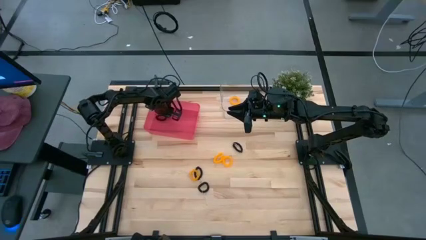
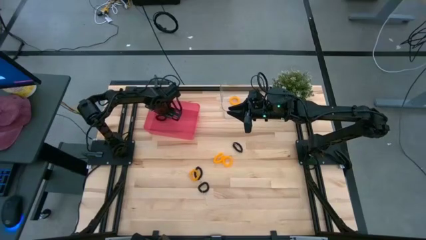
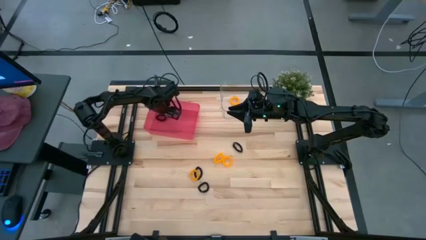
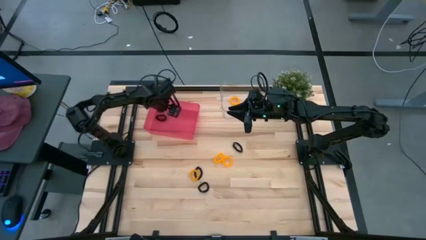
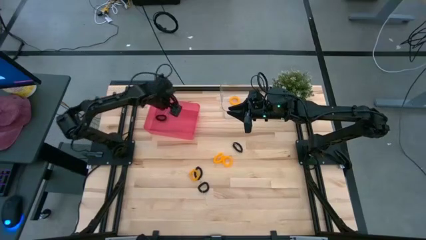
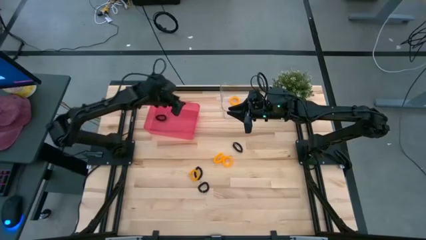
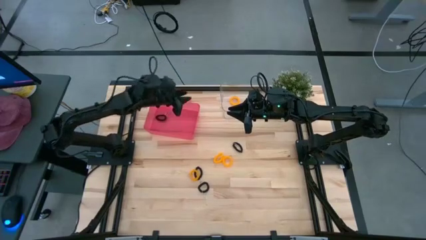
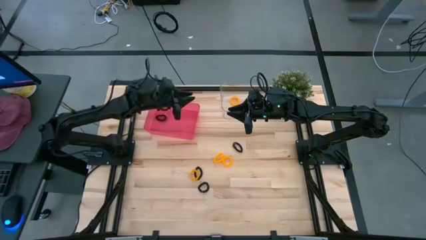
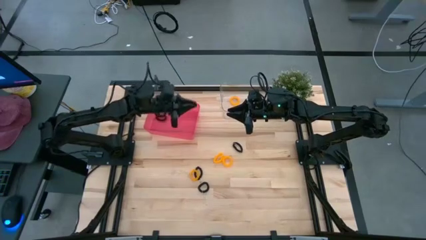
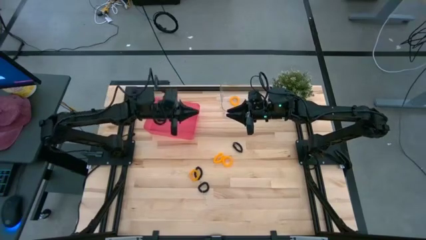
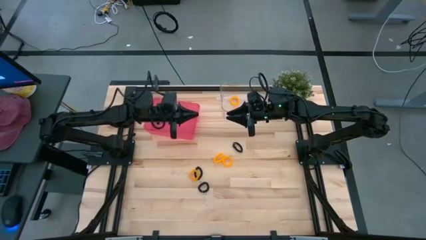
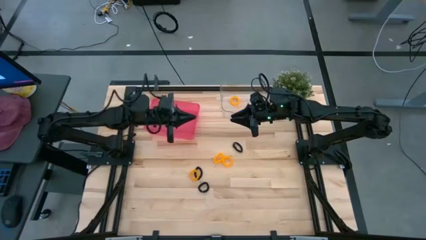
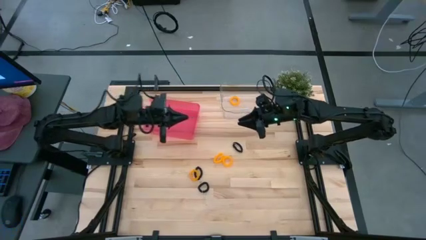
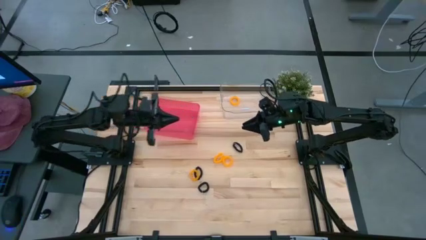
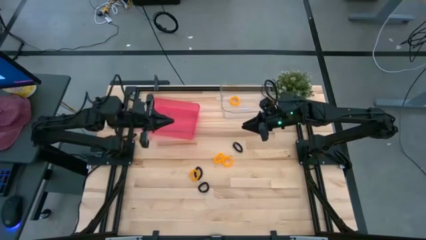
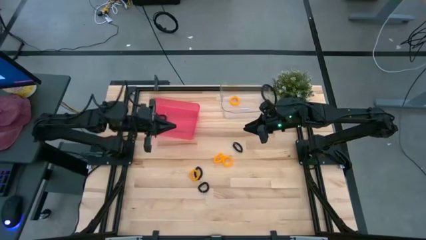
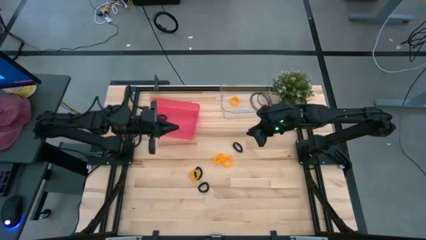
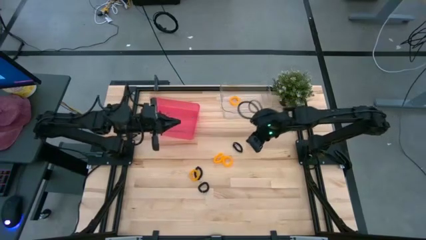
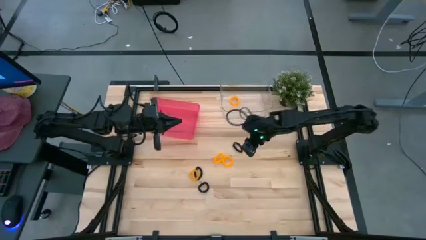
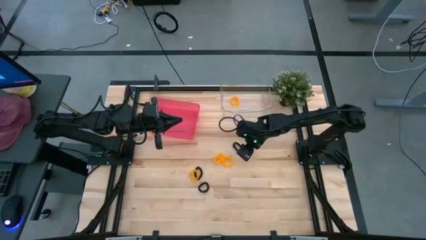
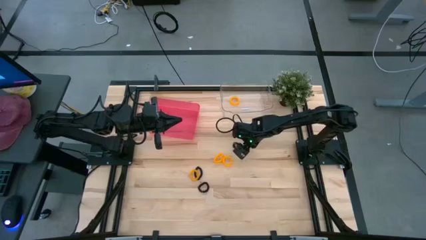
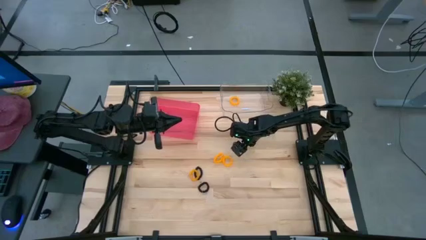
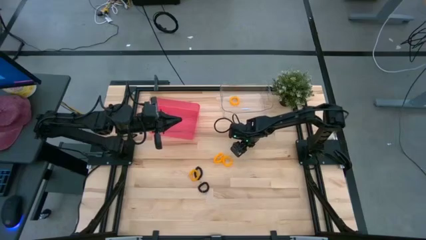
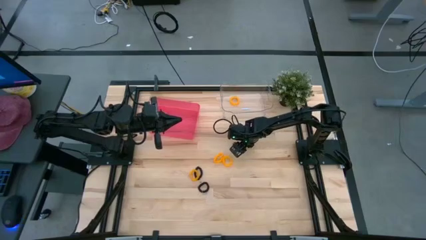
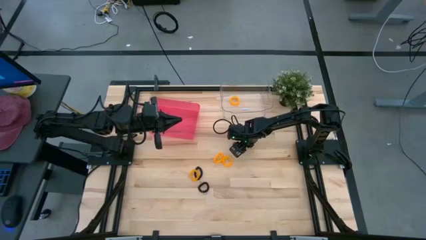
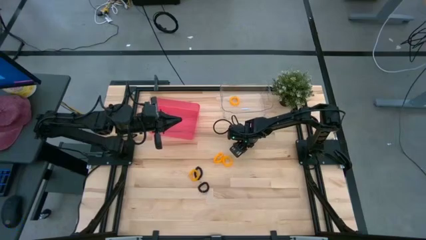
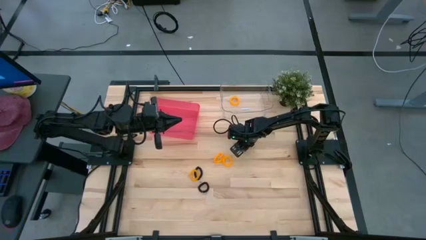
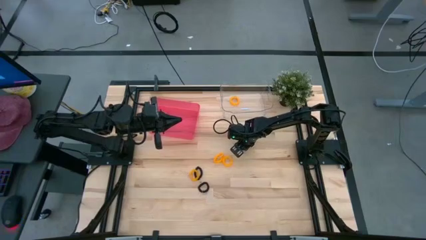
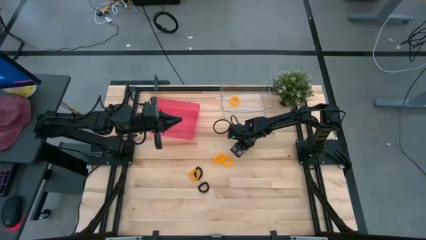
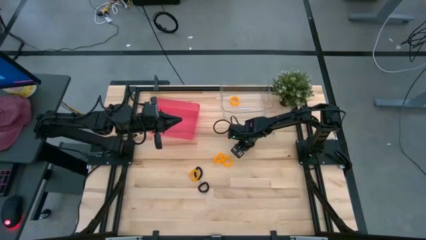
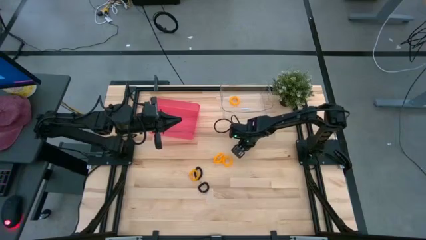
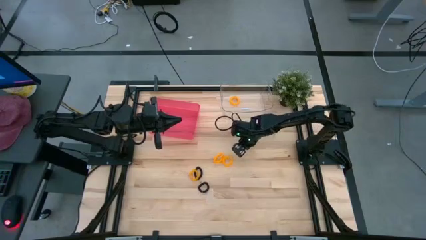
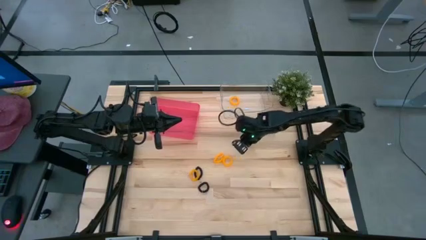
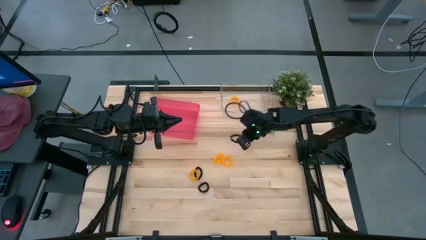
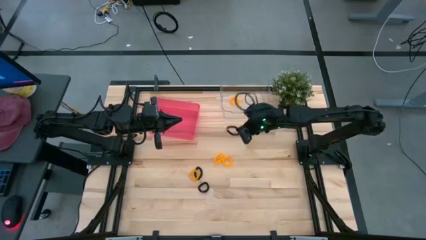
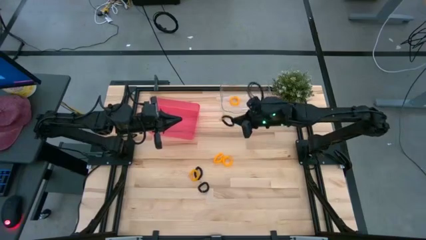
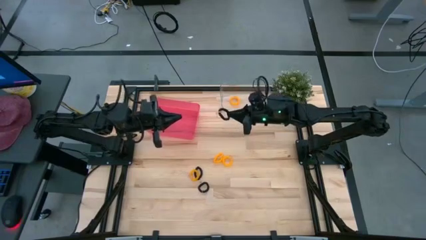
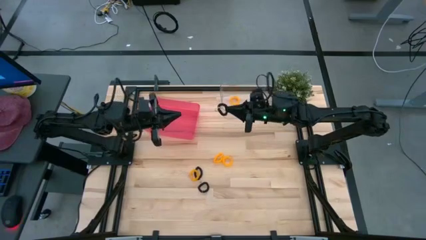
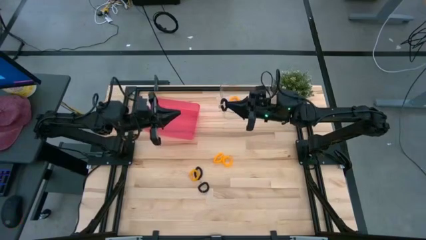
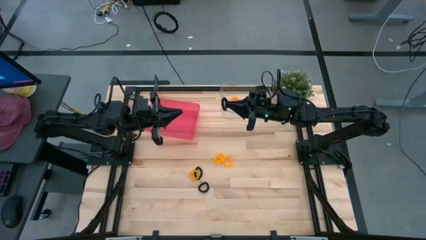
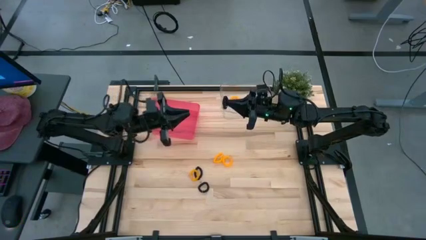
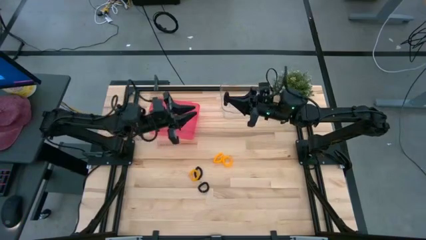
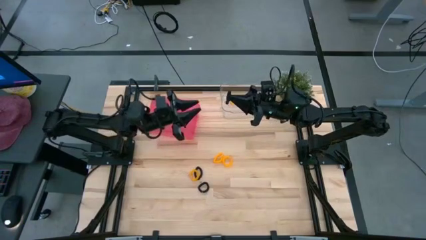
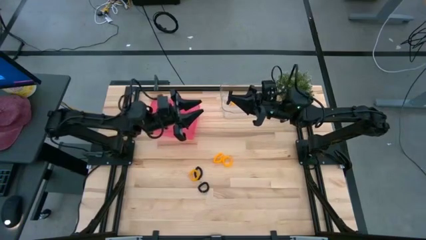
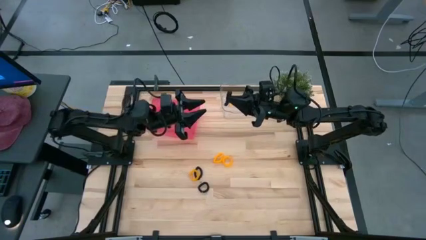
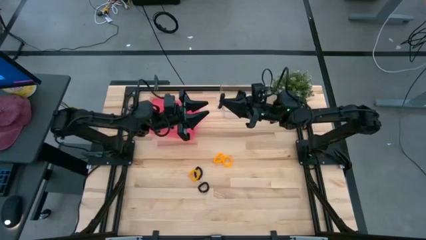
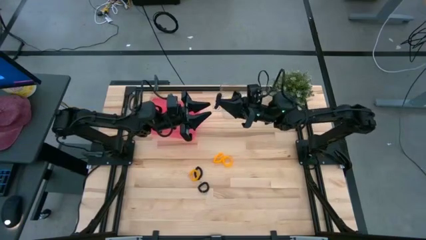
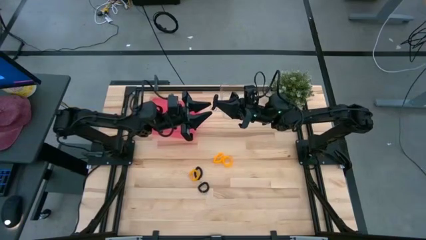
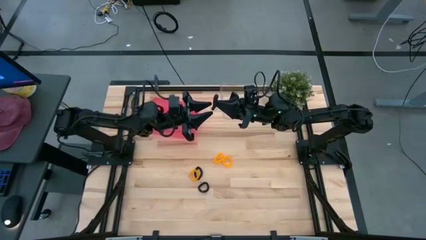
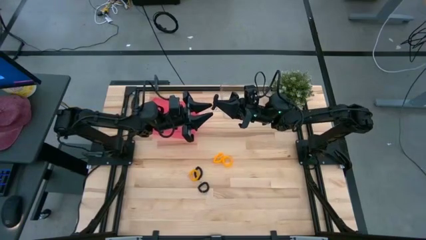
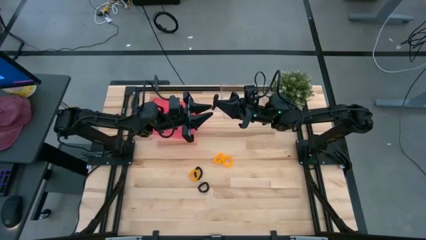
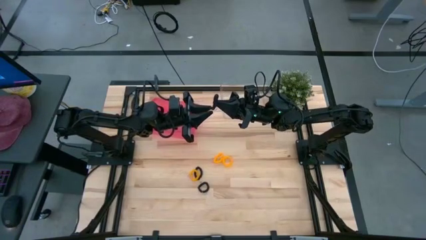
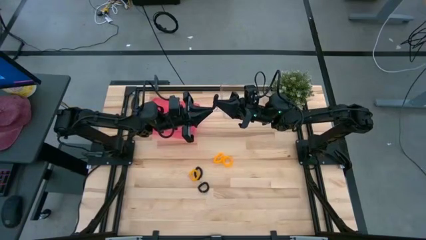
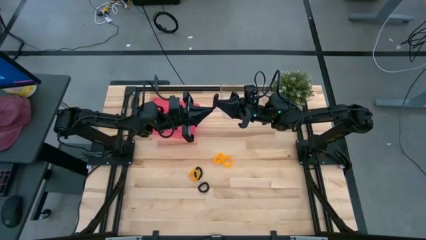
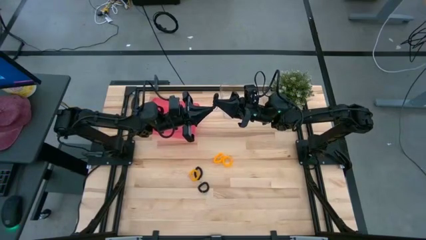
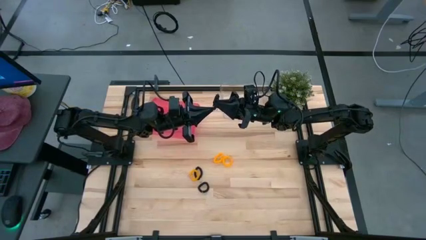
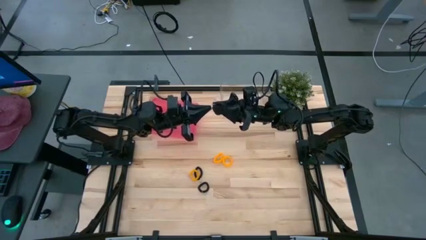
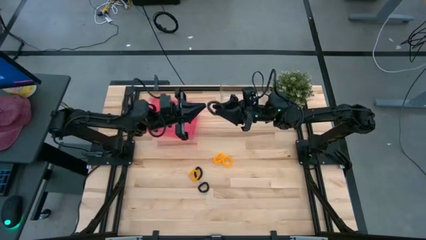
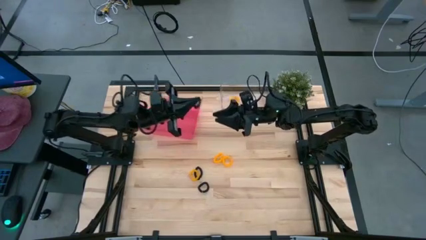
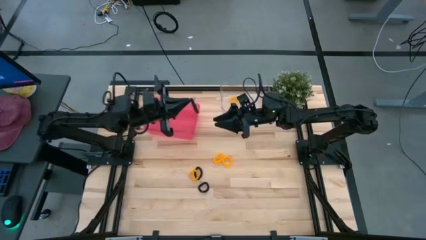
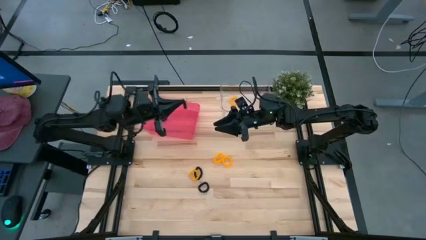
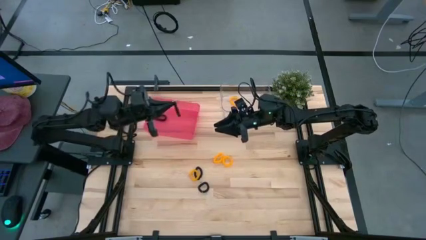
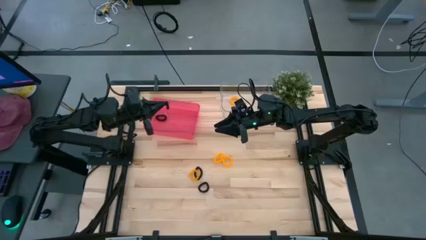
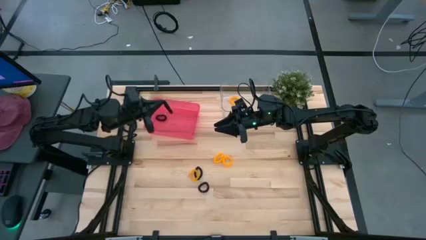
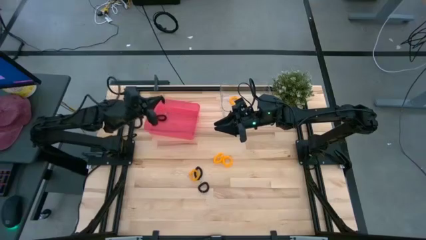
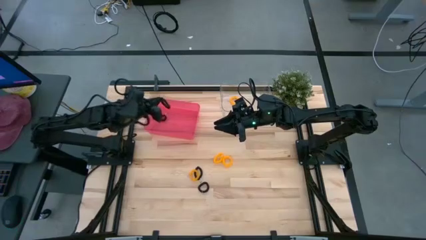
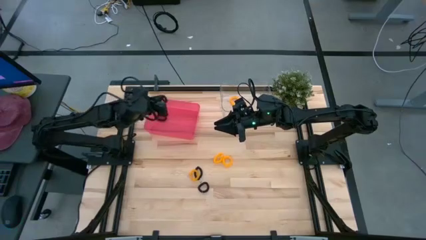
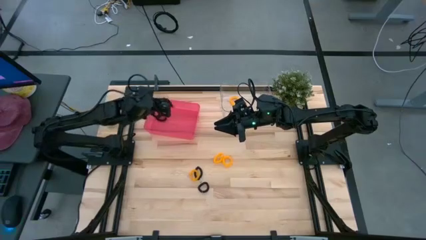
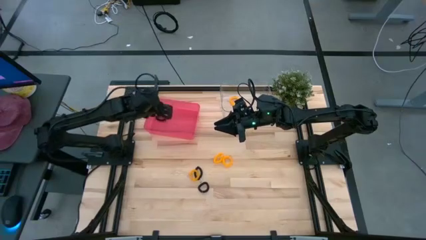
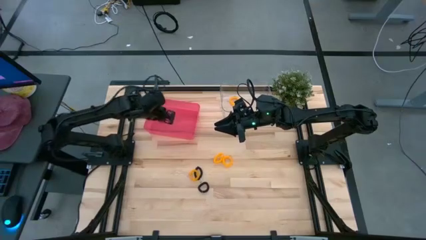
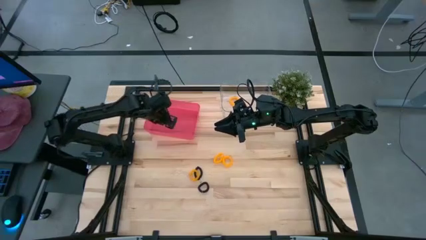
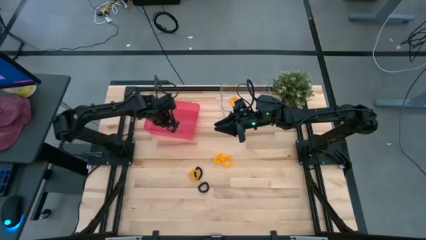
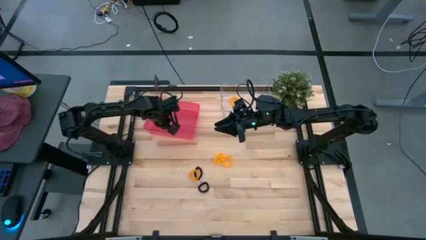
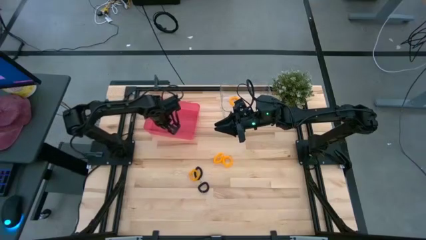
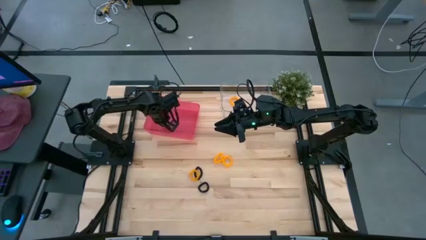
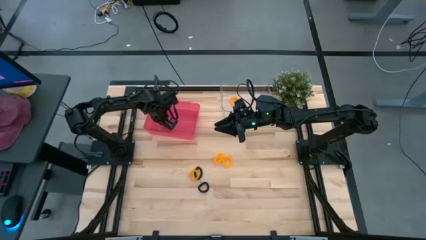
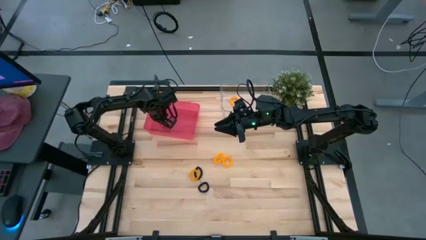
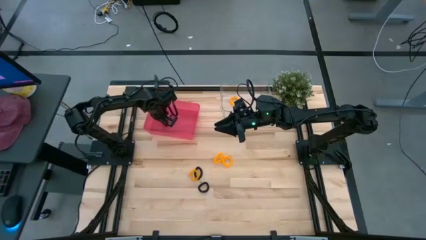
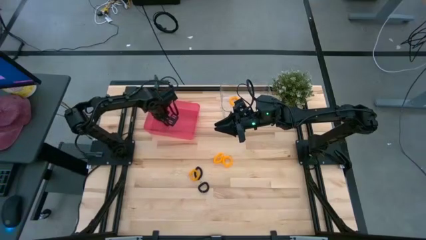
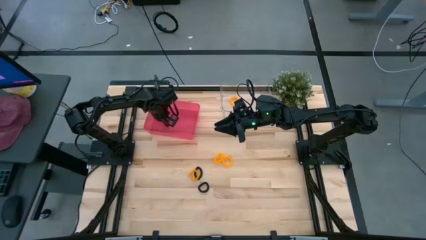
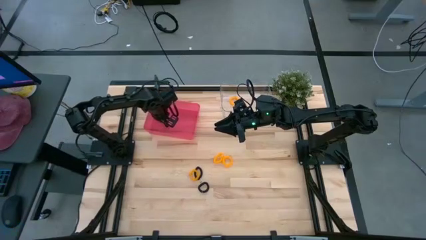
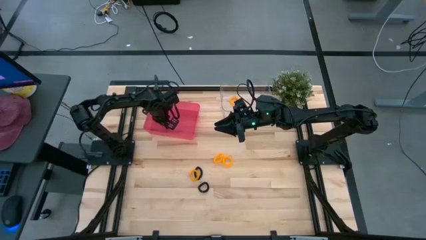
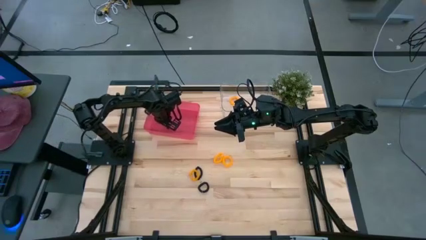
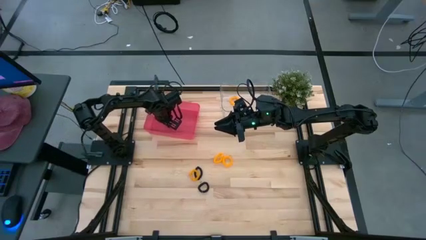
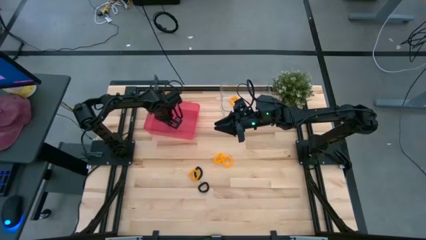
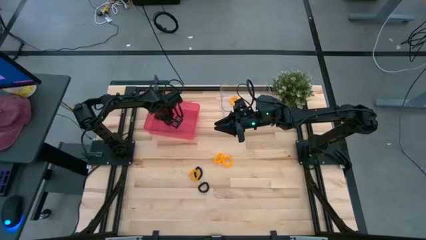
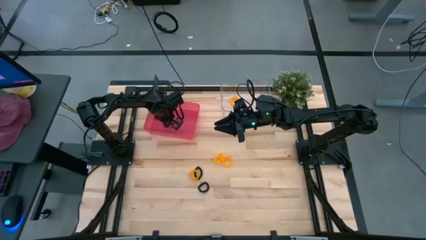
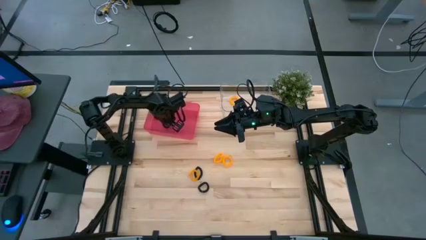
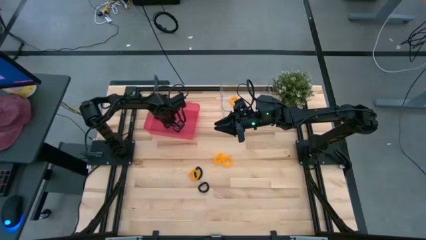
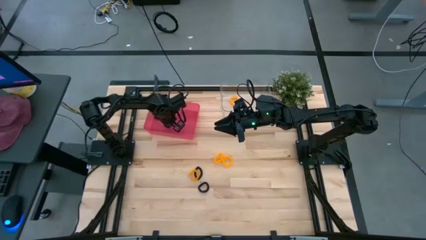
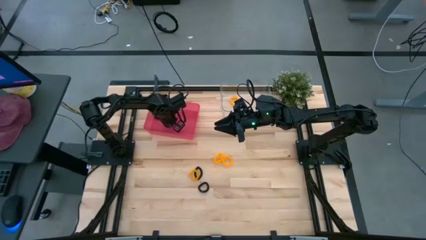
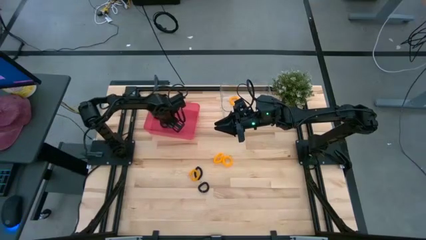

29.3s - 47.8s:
Task: Sort spring keychains
Put the black spring keychain into the pink bin
